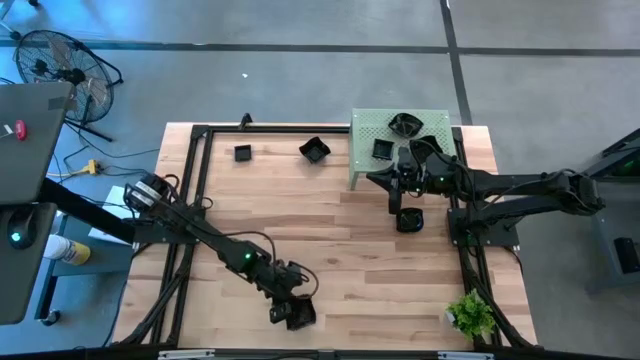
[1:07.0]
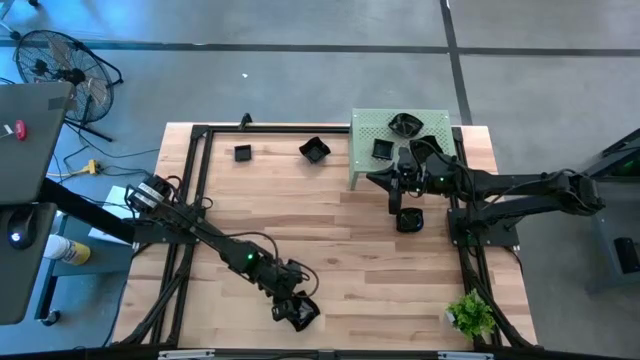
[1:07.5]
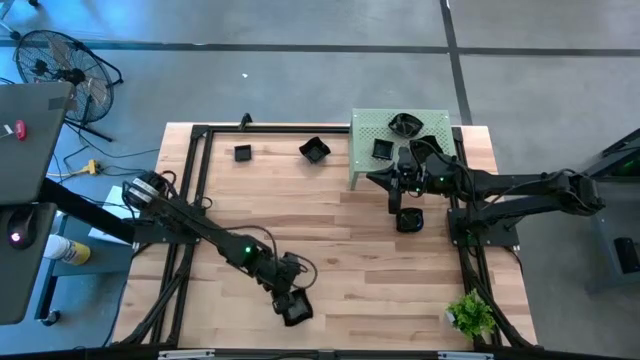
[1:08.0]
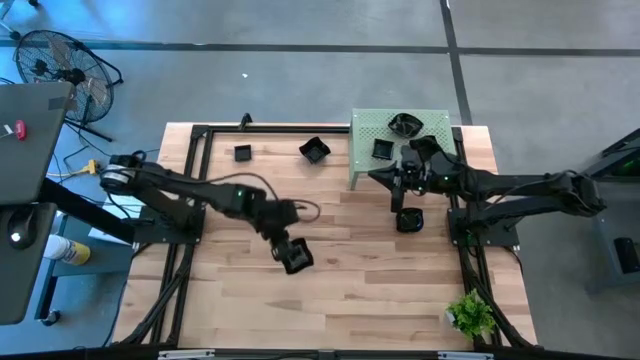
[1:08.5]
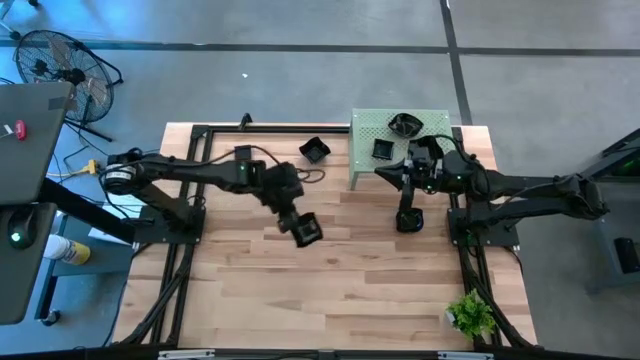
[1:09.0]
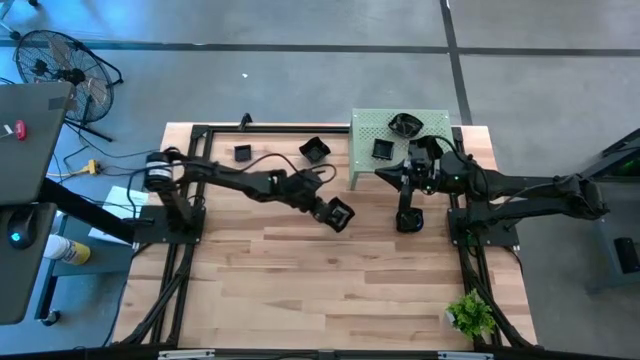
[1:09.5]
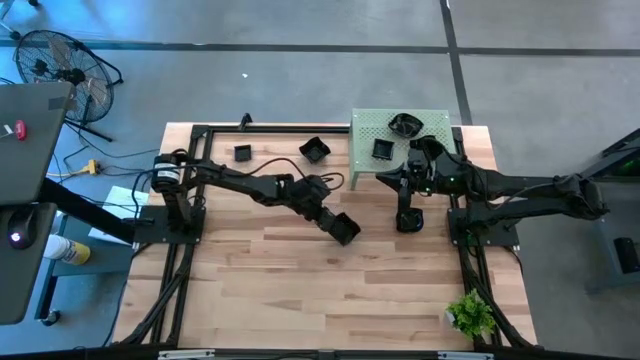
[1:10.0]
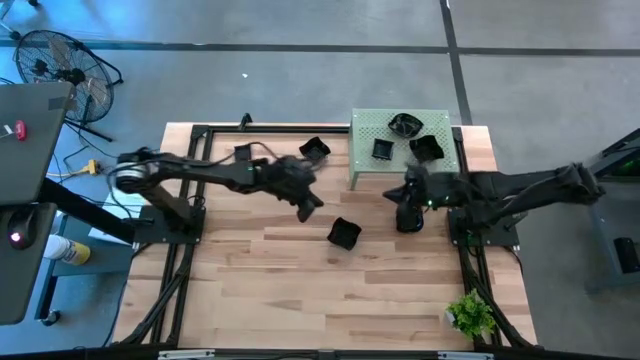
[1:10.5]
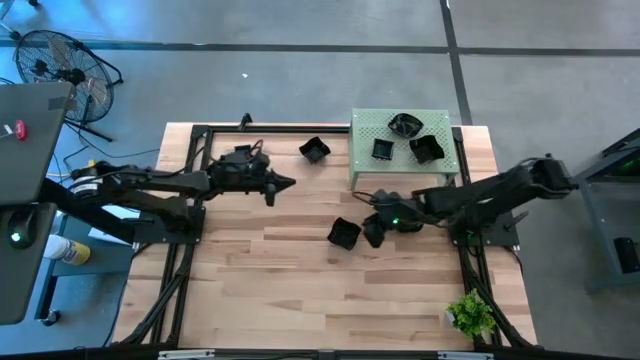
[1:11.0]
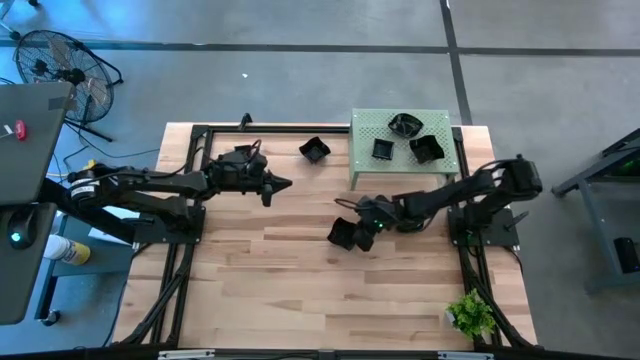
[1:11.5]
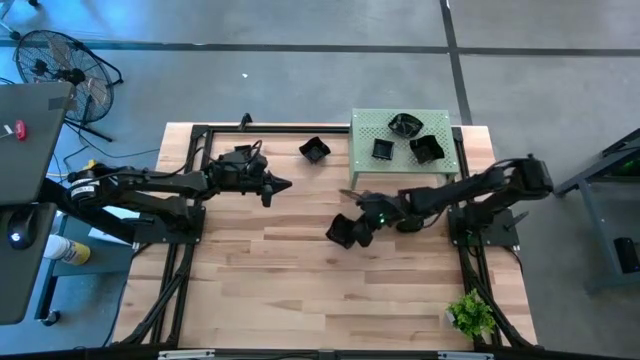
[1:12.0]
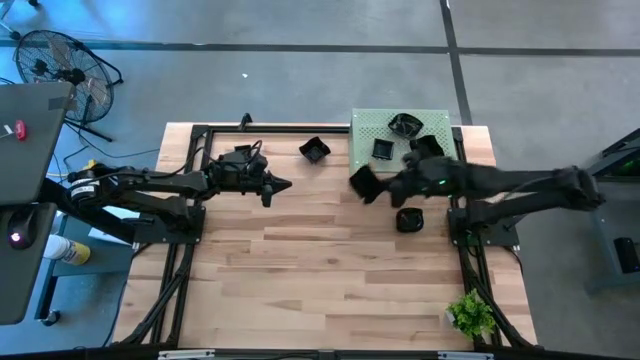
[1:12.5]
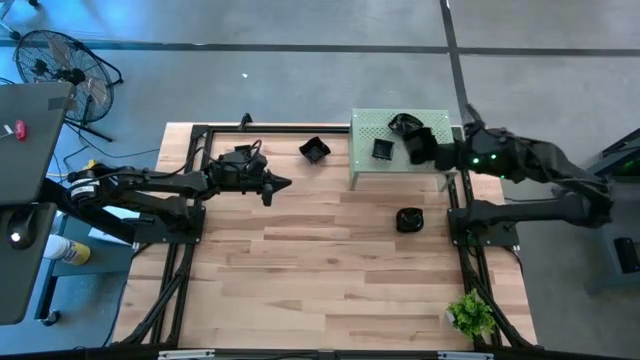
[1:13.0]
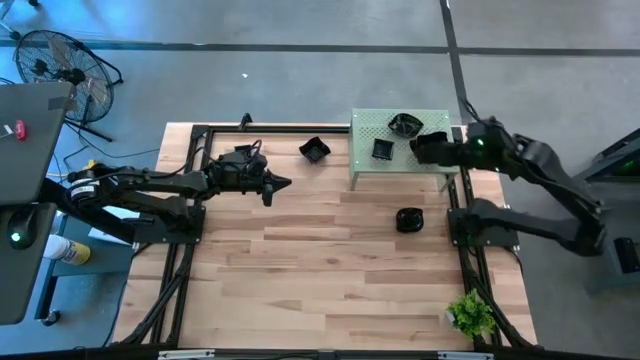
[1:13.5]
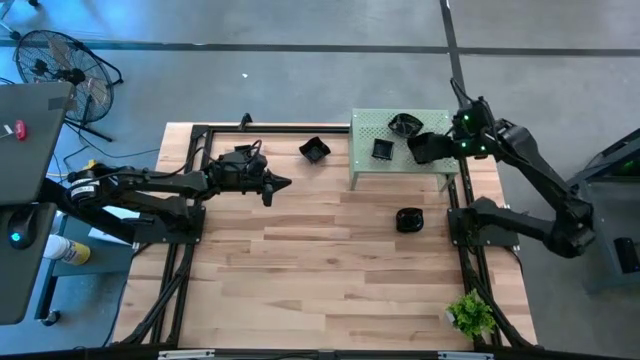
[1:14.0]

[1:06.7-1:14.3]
Task: Pick & Place Mini shaped plates
Stack the black distorted square plate on top of the black distorted square plate on the shelf

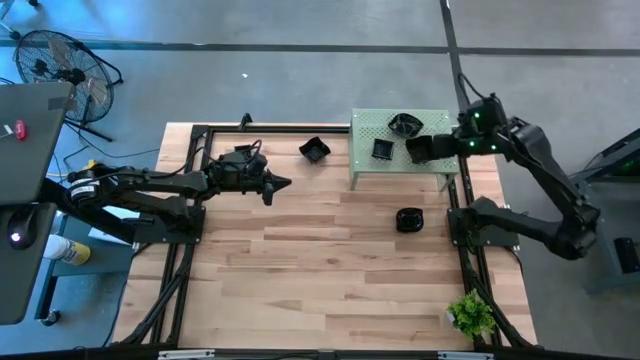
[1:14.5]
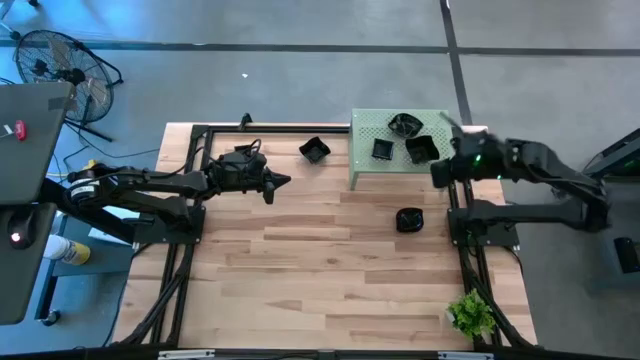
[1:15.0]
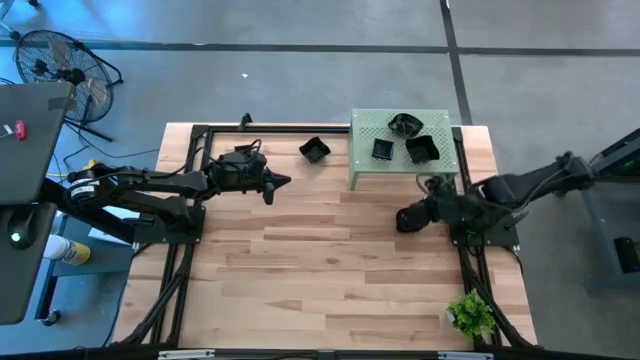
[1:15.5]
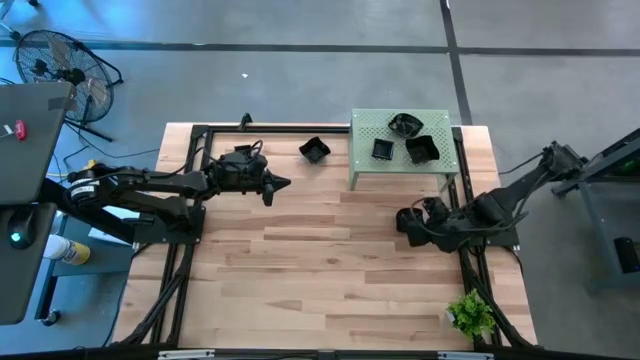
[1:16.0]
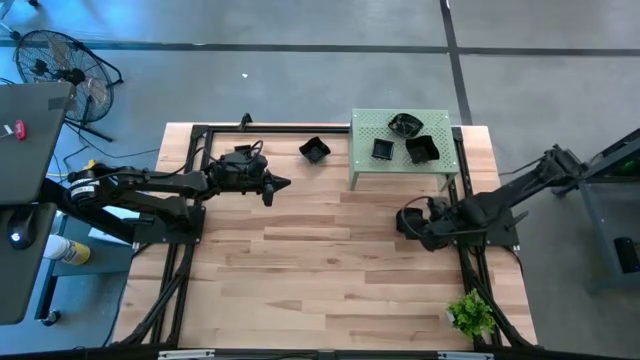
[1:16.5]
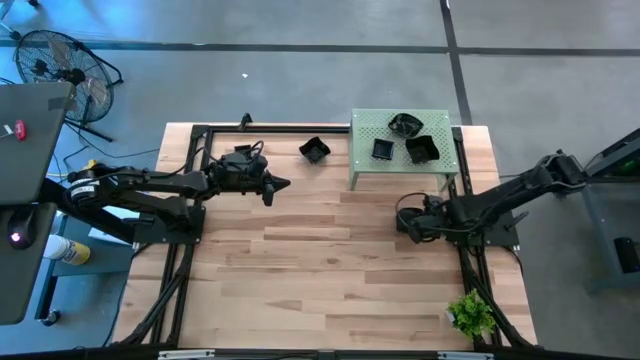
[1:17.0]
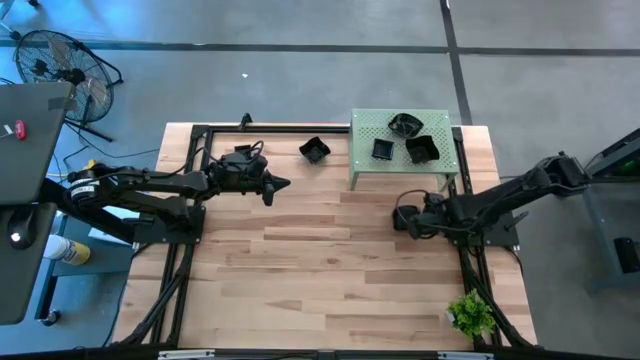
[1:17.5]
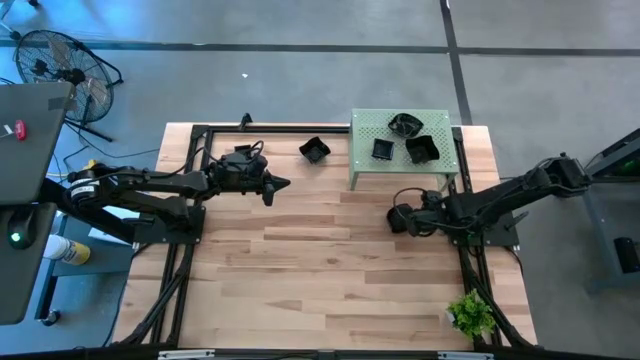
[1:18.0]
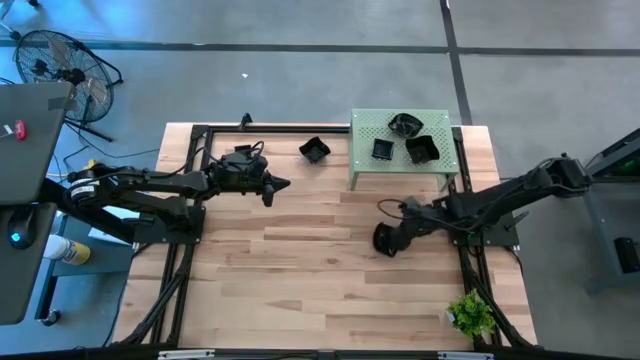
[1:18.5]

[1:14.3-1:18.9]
Stack the black leaf-shaped plate on top of the black leaf-shaped plate on the shelf

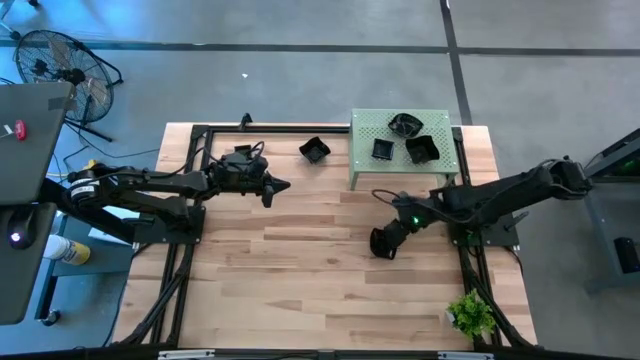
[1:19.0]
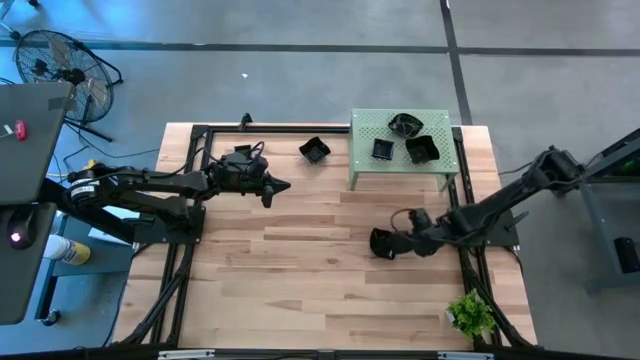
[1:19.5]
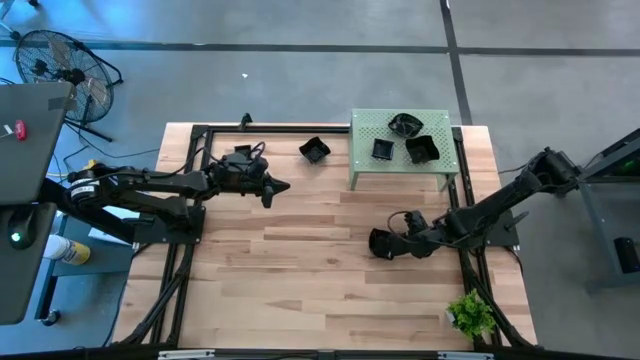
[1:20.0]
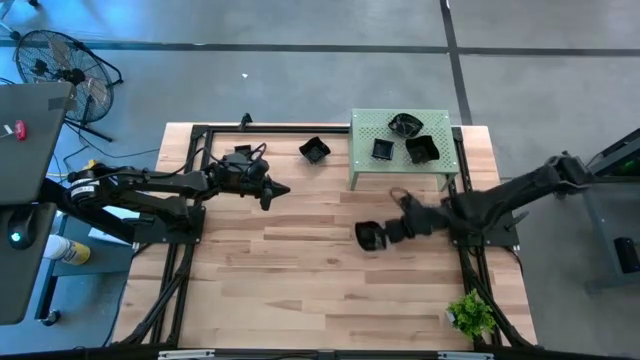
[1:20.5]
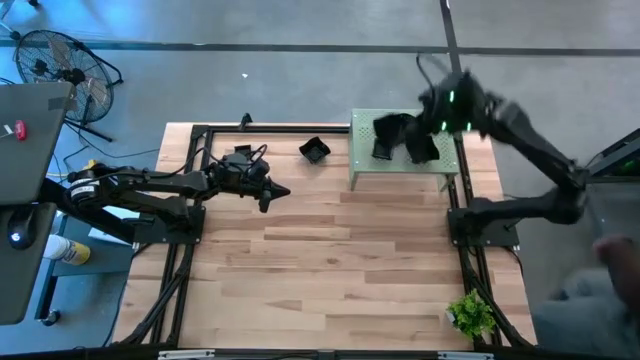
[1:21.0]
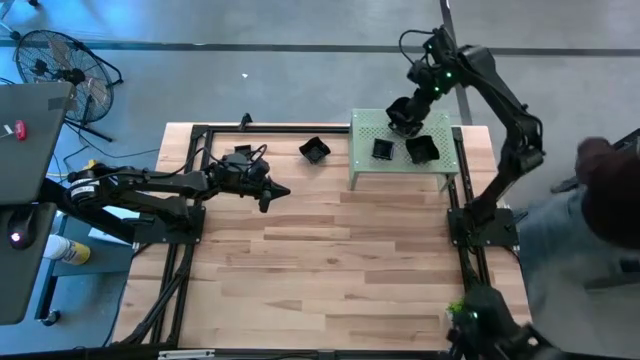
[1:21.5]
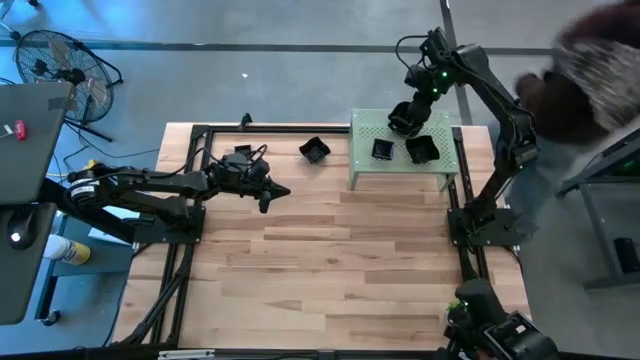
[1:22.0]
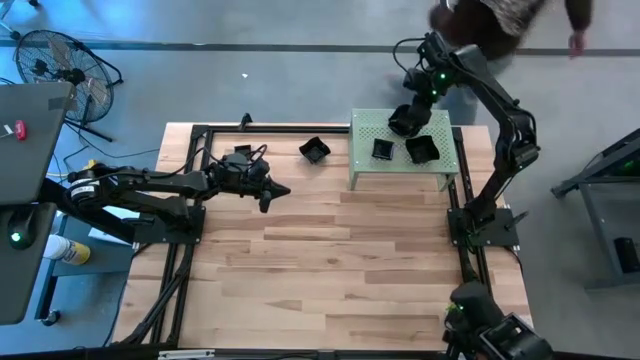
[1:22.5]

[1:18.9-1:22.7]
Stack the black leaf-shaped plate on top of the black leaf-shaped plate on the shelf

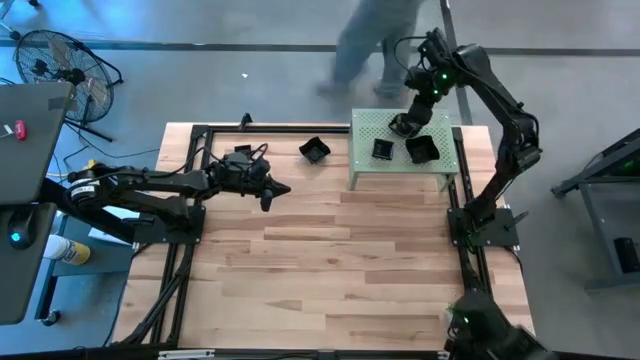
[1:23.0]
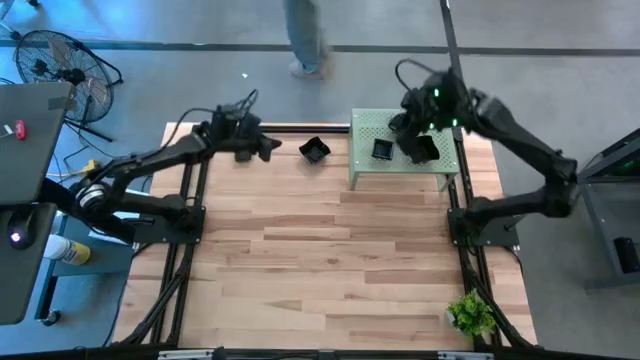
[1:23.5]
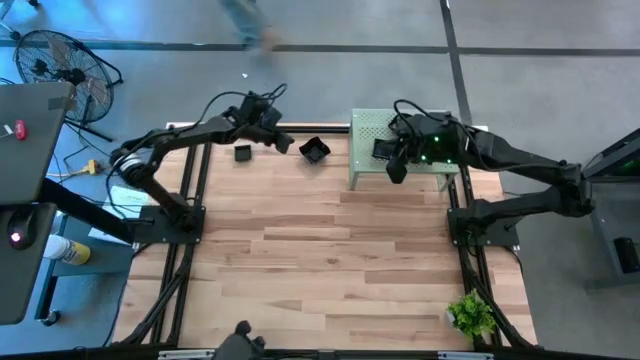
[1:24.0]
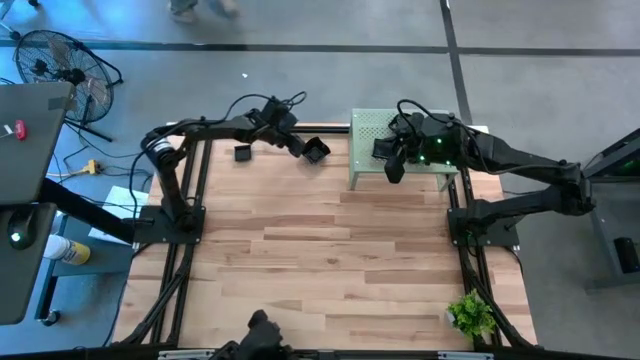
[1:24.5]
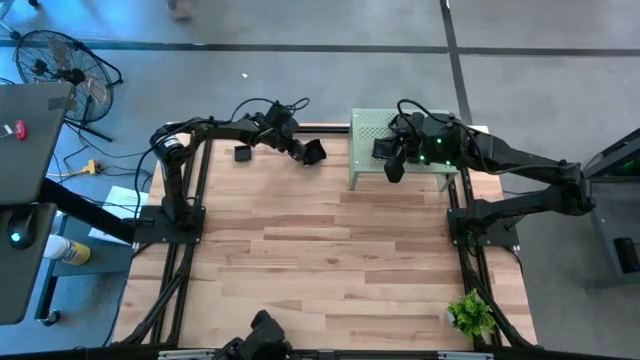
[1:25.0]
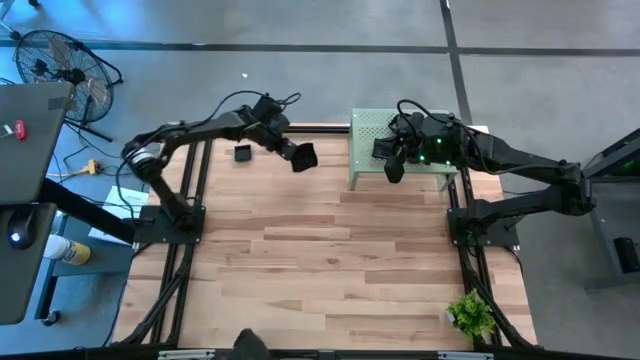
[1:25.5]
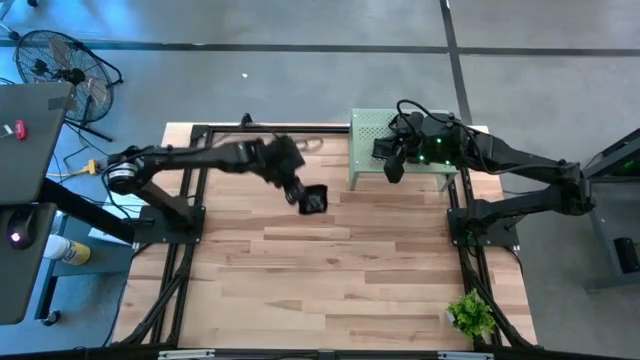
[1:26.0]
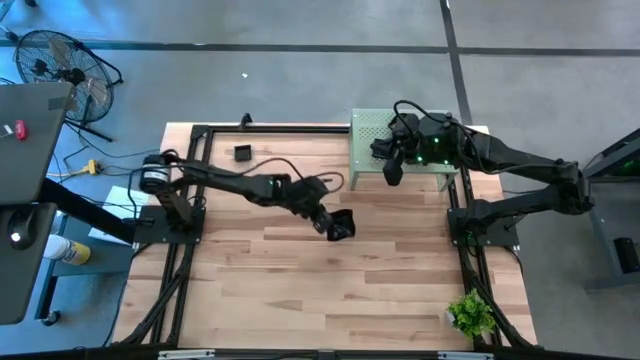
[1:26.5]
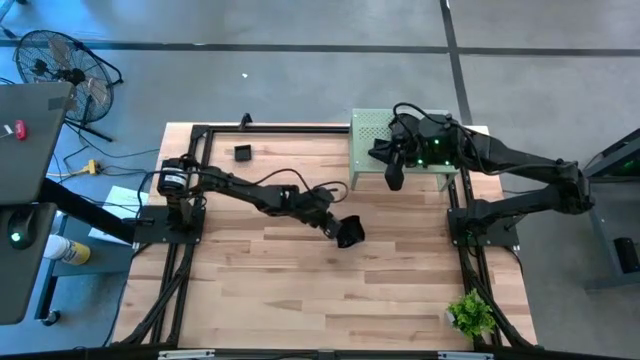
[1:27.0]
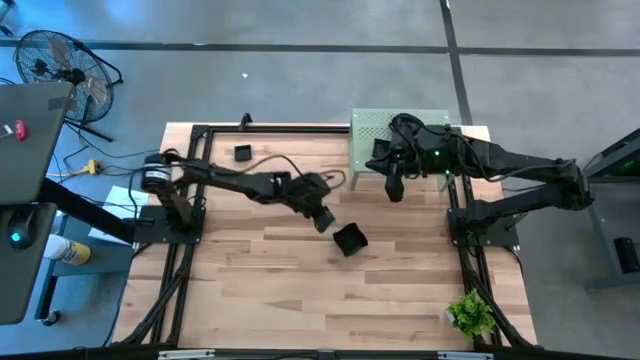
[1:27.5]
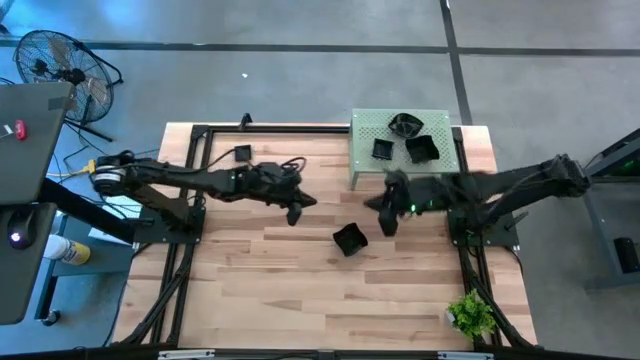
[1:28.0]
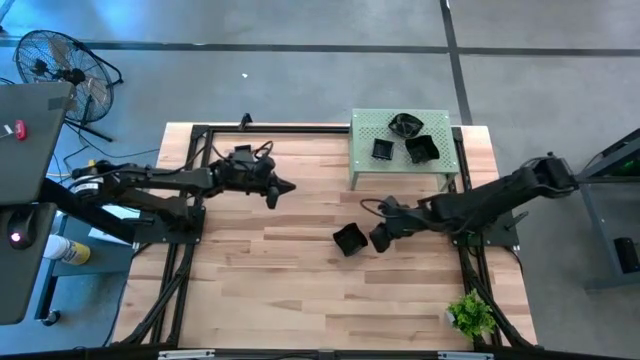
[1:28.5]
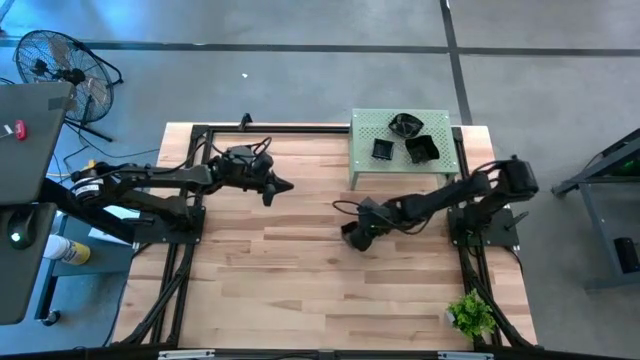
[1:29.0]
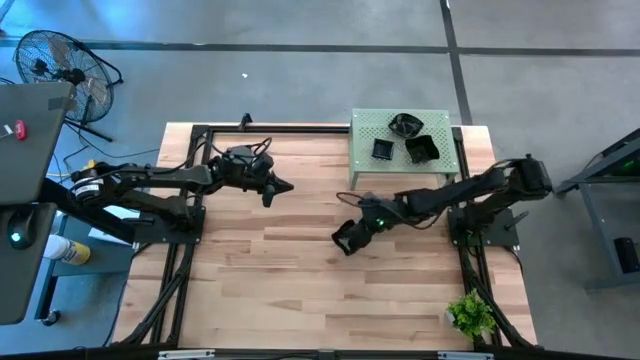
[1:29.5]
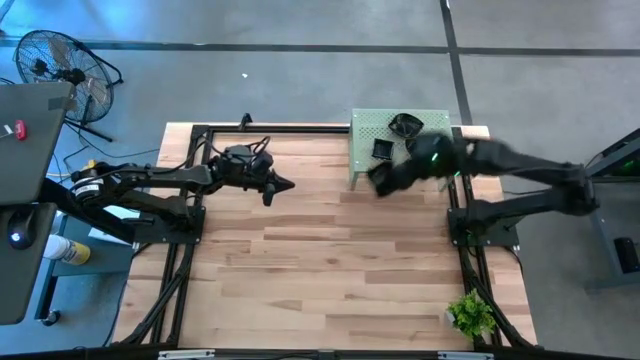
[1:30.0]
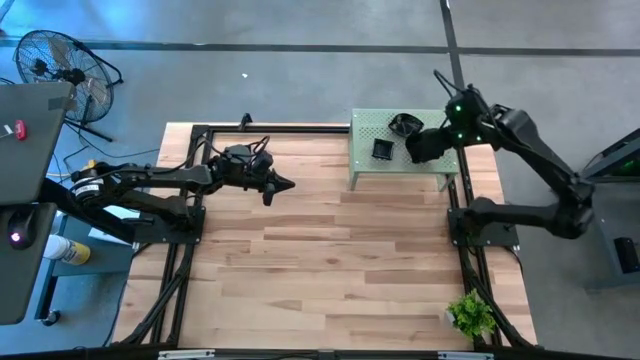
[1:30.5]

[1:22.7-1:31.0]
Stack the black distorted square plate on top of the black distorted square plate on the shelf
